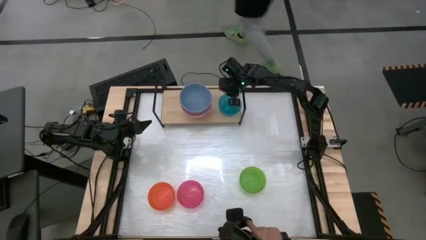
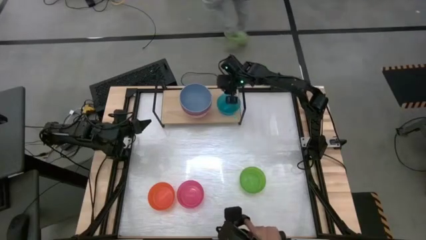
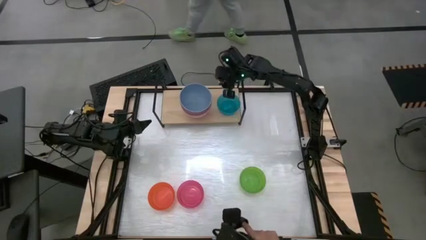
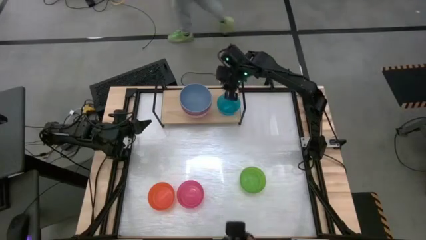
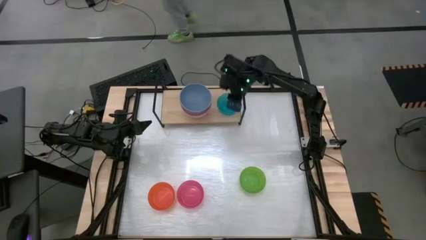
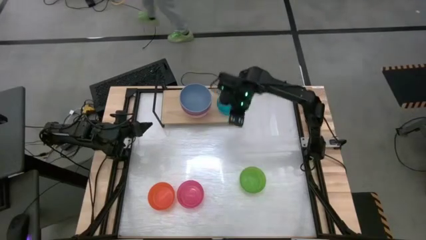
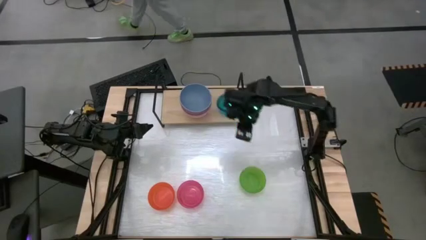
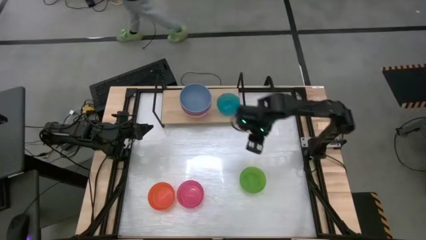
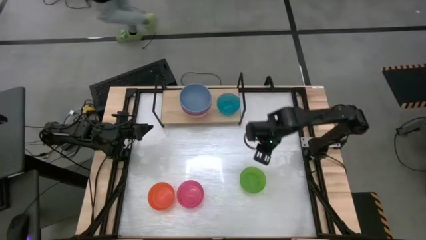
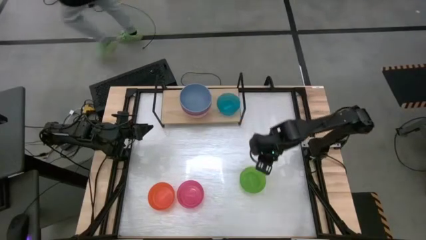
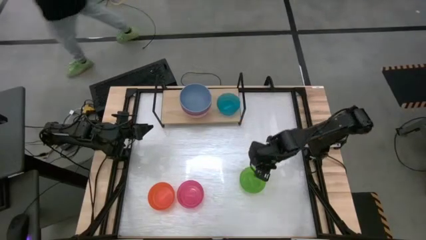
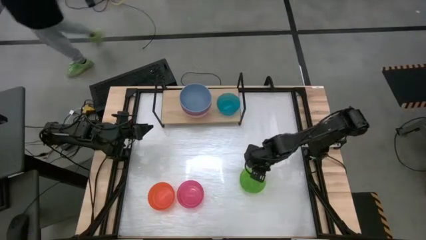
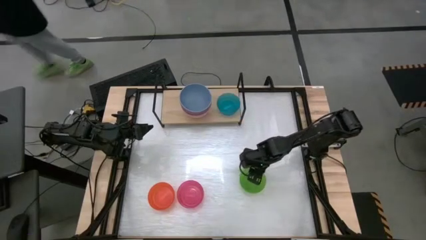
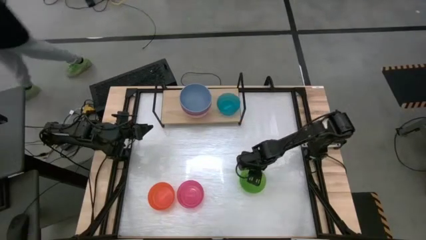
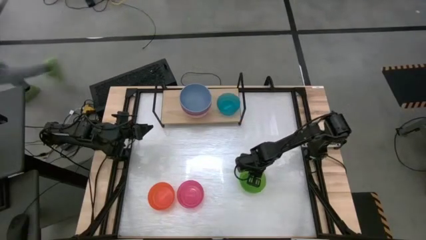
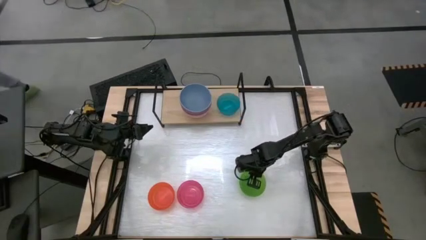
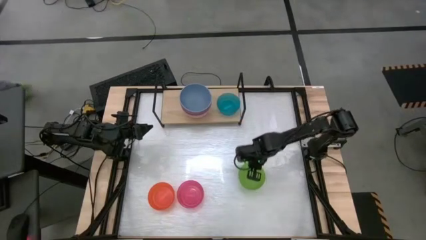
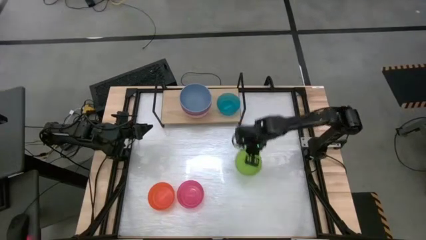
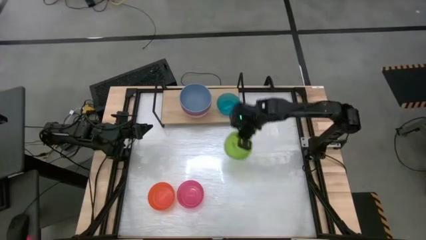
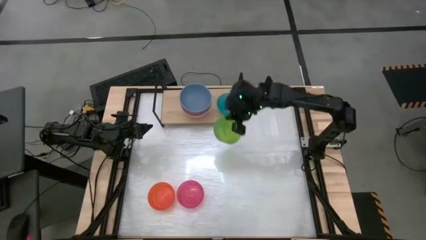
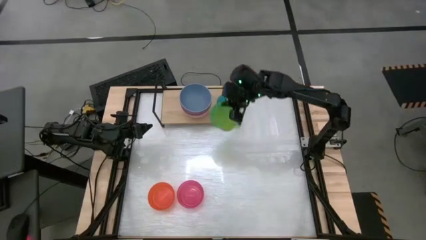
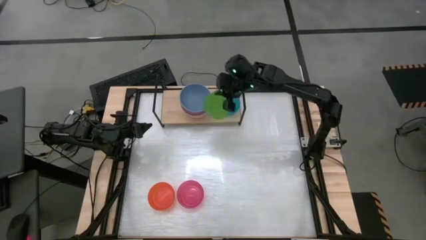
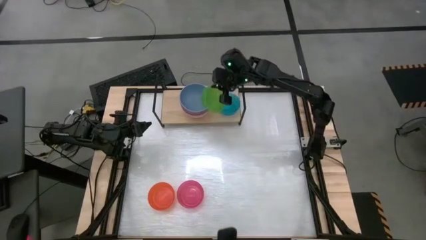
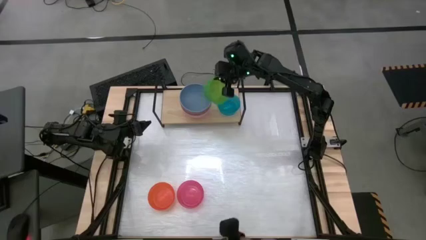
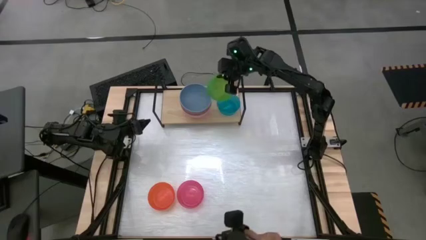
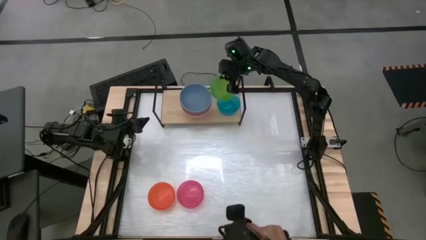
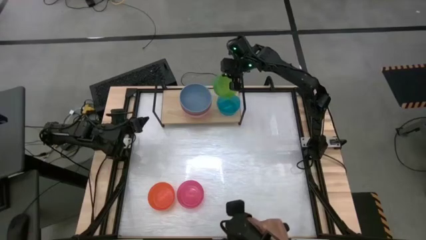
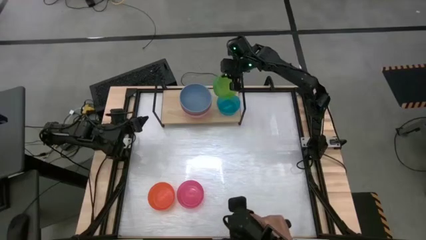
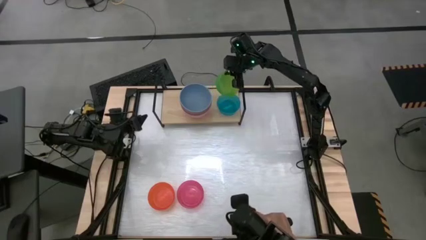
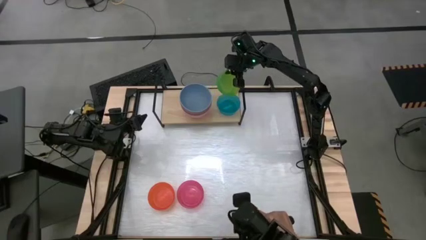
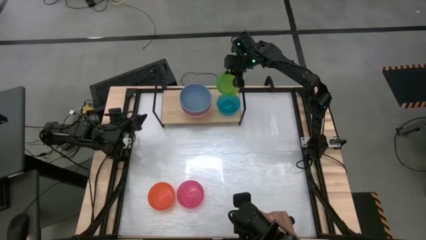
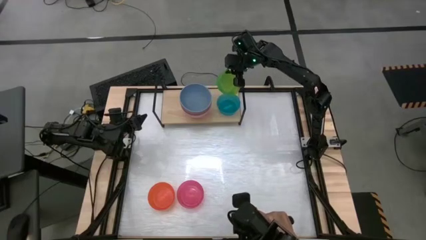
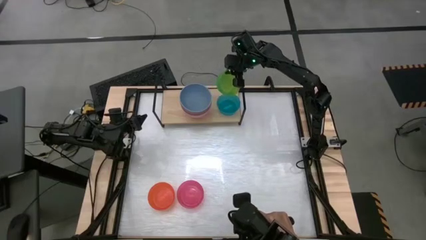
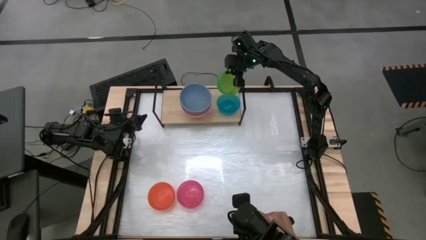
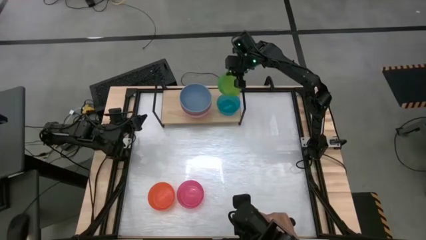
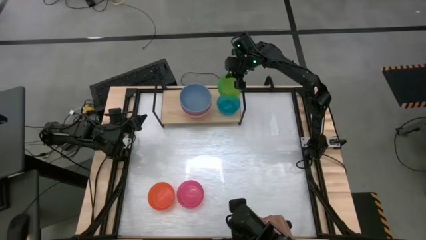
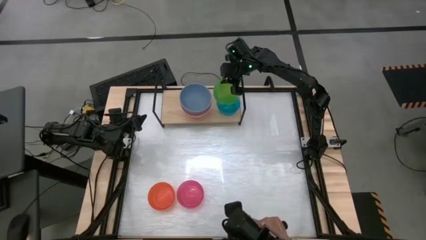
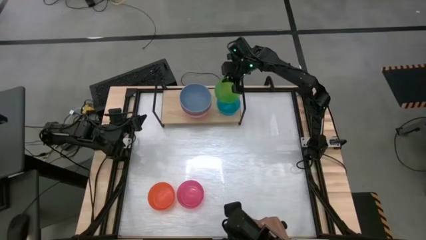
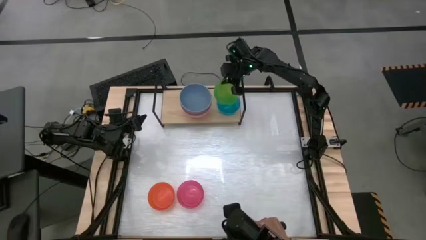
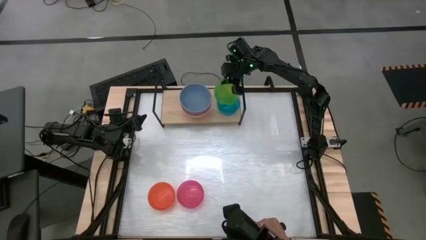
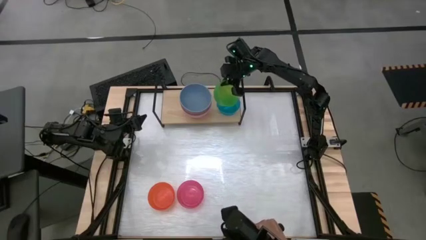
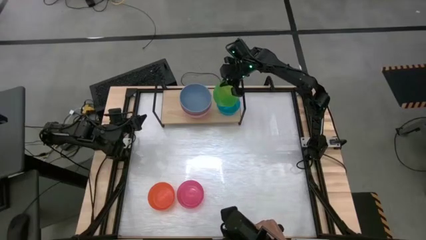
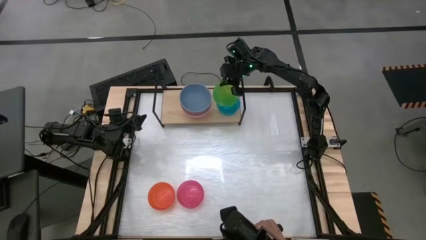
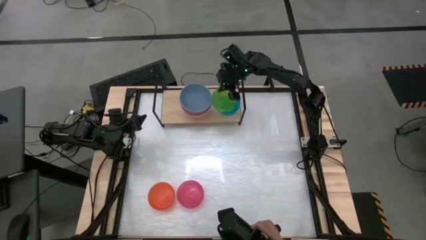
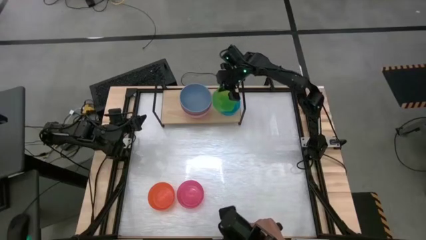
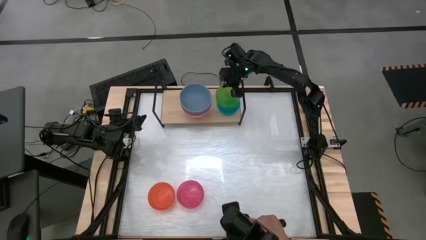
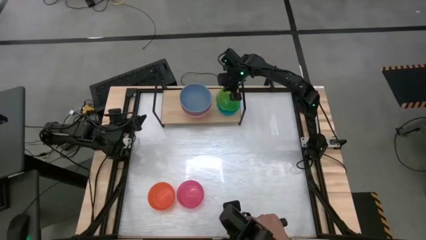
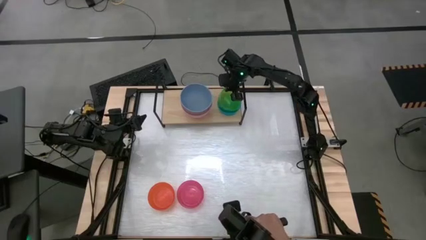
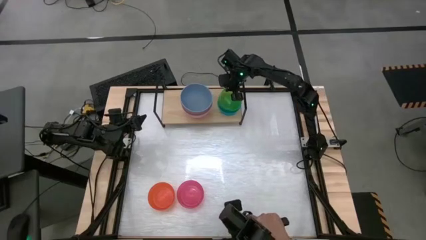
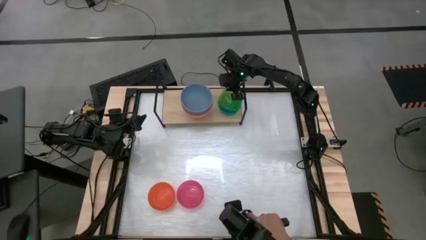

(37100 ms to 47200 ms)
Task: Place and stack bowls onto a shelf
Stack the green bowl on top of the light blue bowl on the shelf

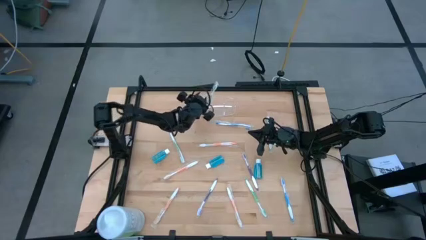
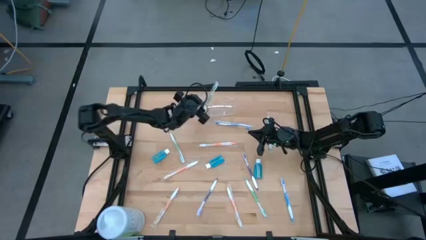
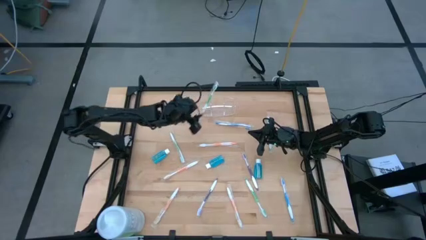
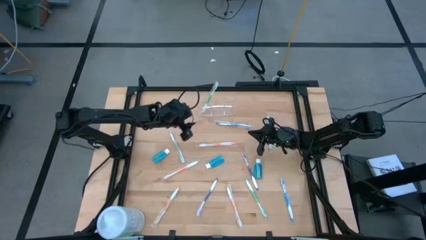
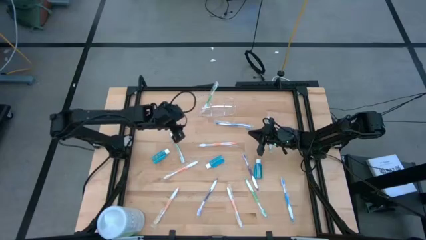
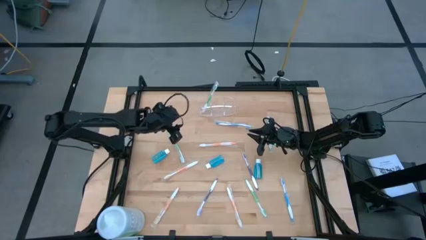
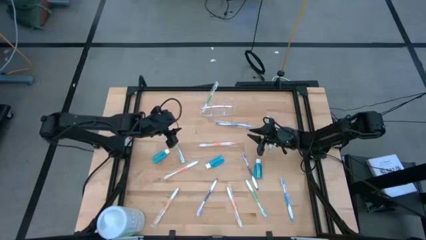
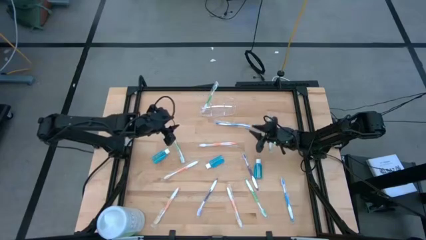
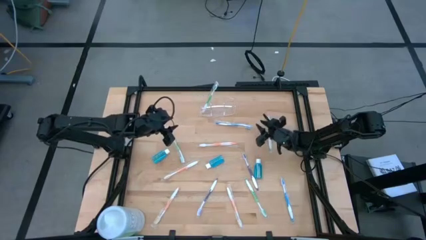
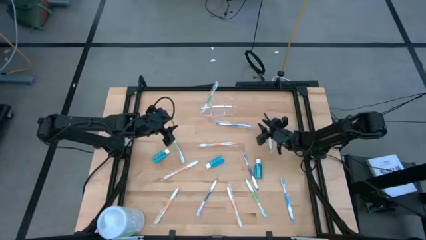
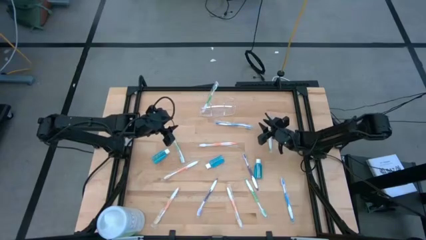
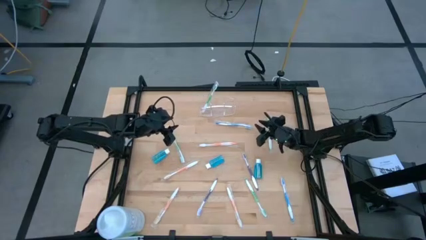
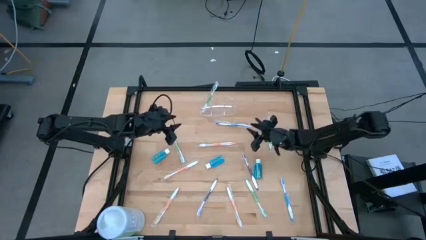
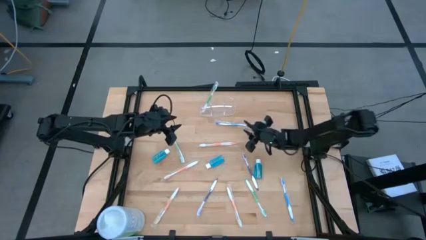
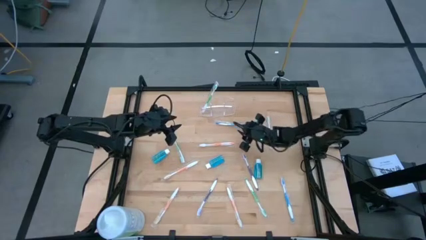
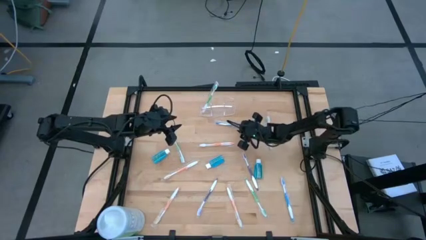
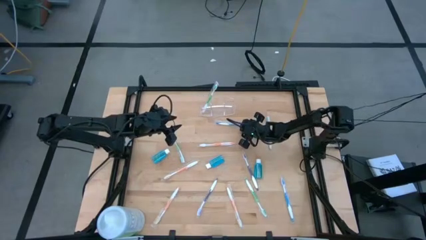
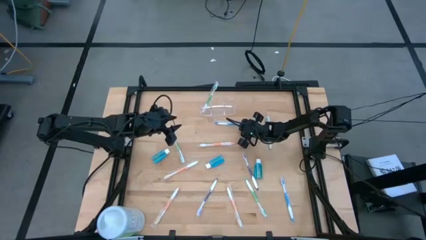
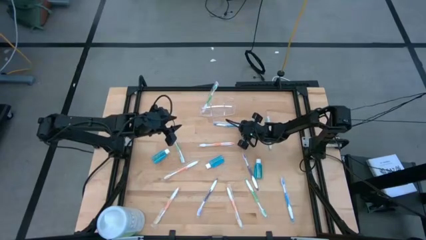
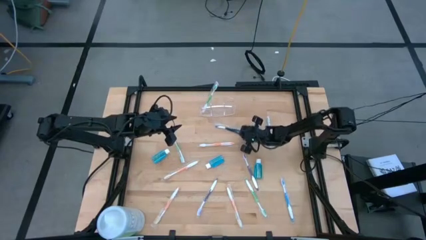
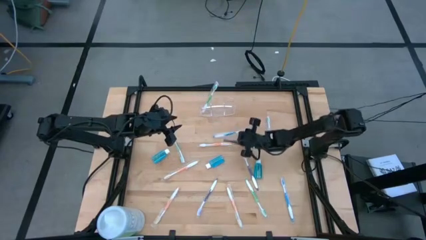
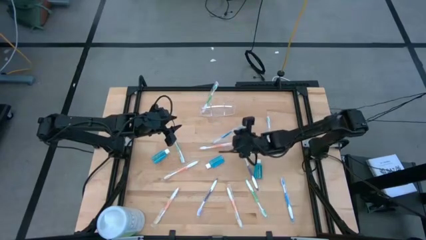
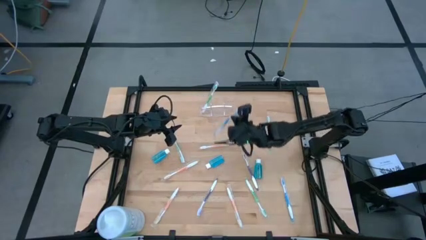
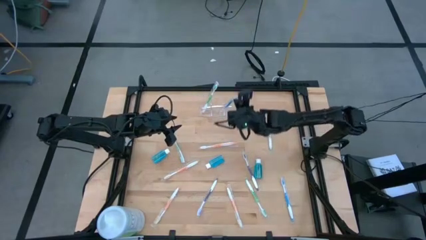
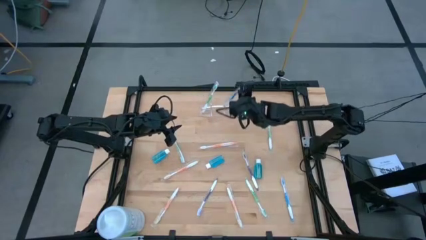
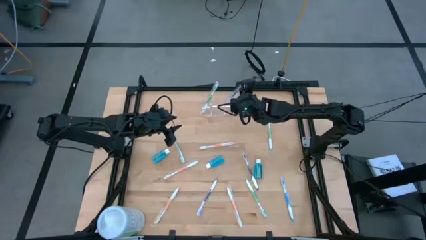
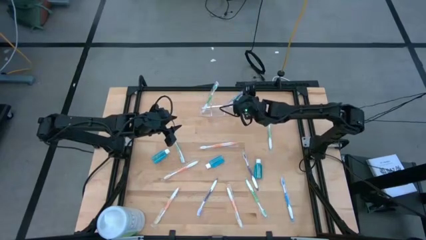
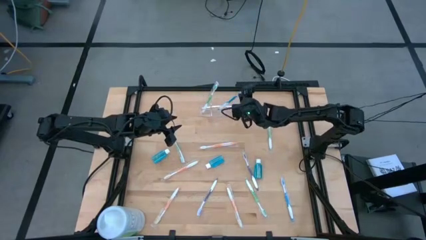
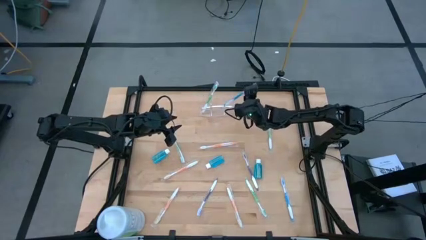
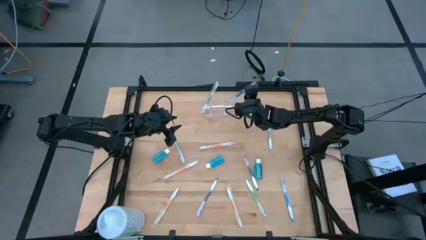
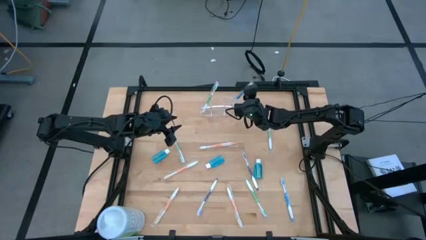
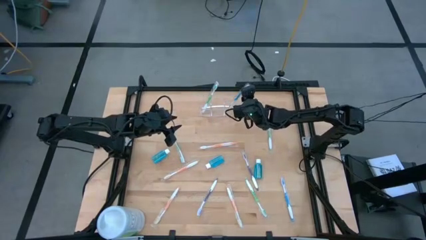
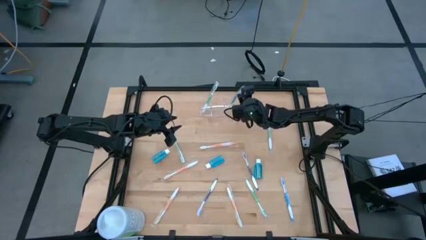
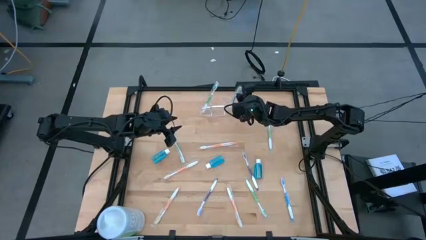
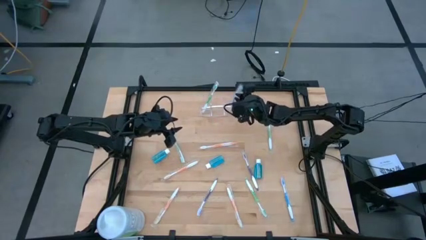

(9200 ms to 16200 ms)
Task: Pick & Place toothbrushing station
Put the blue toothbrush into the transparent organizer
